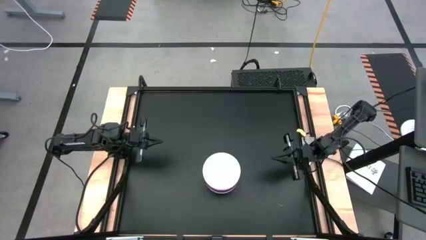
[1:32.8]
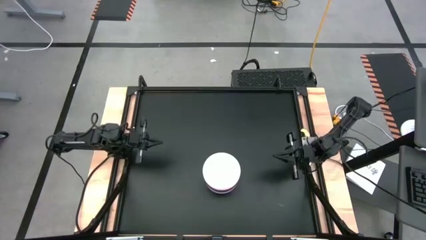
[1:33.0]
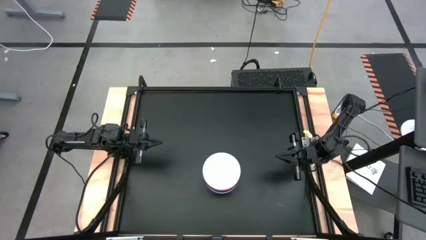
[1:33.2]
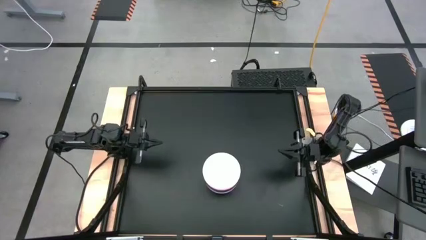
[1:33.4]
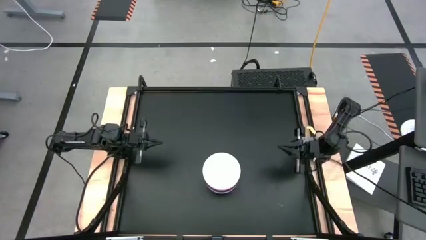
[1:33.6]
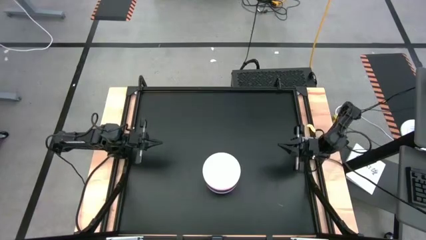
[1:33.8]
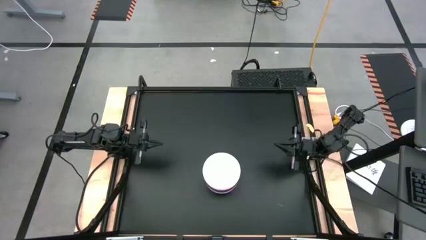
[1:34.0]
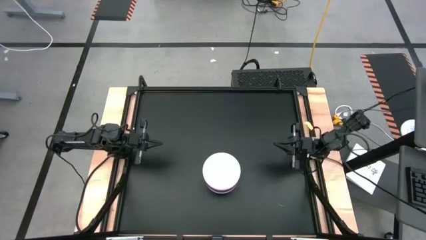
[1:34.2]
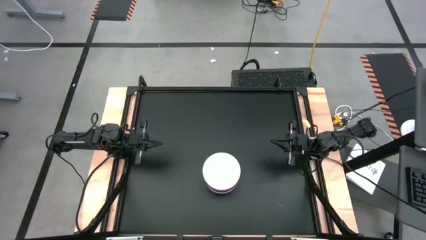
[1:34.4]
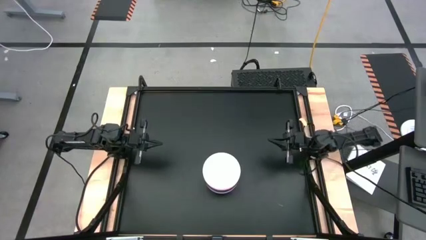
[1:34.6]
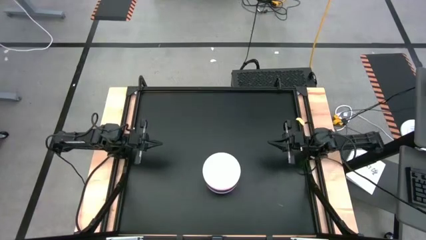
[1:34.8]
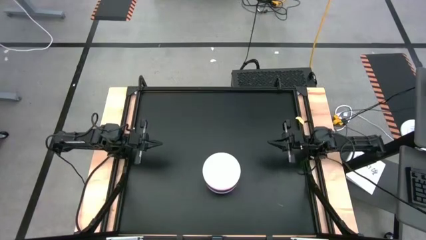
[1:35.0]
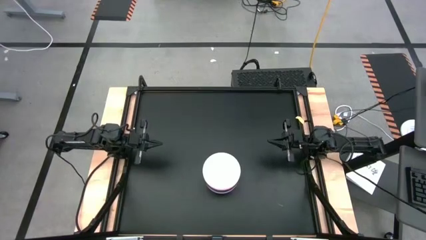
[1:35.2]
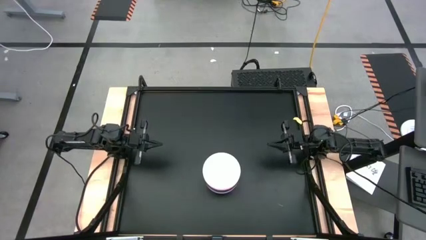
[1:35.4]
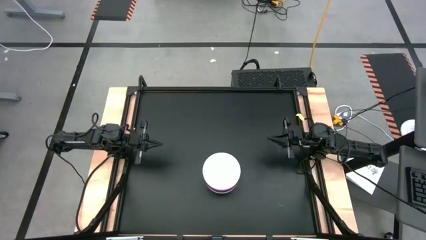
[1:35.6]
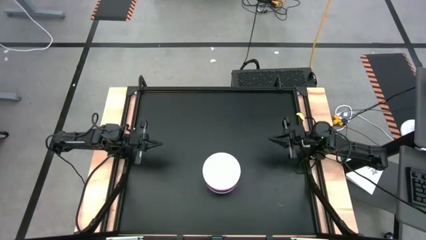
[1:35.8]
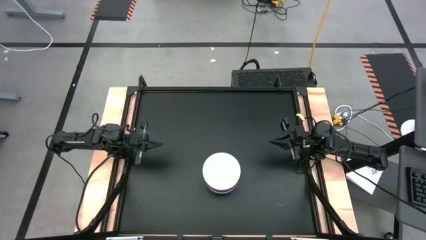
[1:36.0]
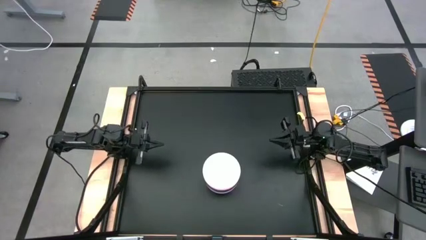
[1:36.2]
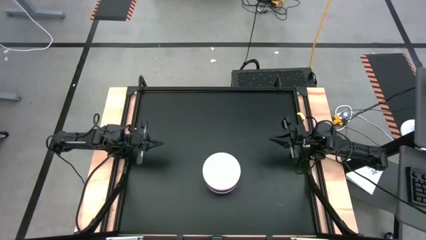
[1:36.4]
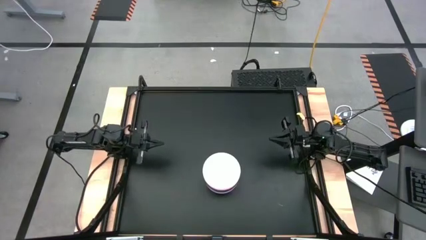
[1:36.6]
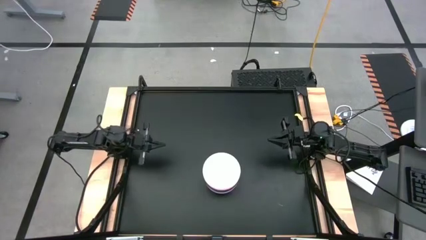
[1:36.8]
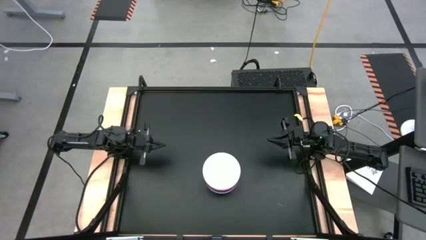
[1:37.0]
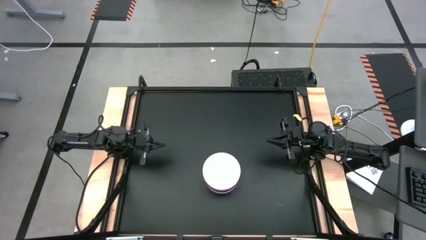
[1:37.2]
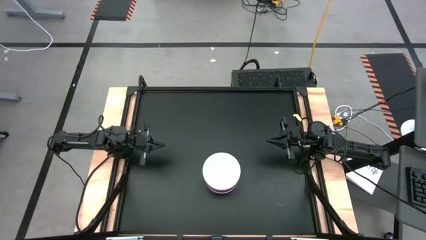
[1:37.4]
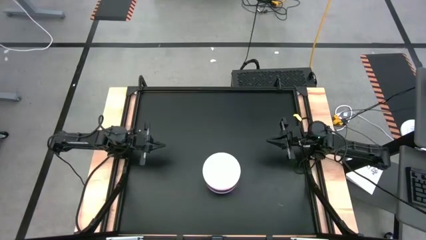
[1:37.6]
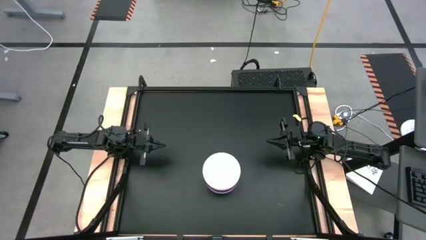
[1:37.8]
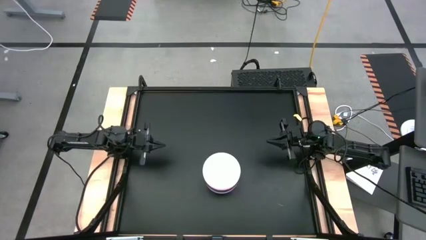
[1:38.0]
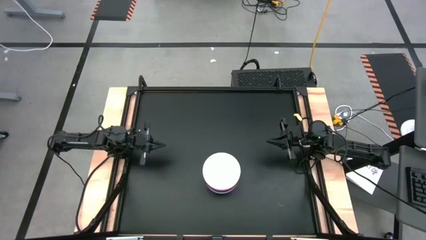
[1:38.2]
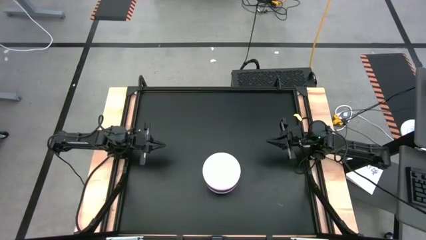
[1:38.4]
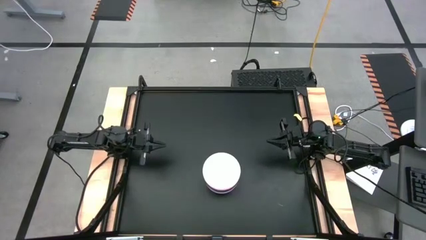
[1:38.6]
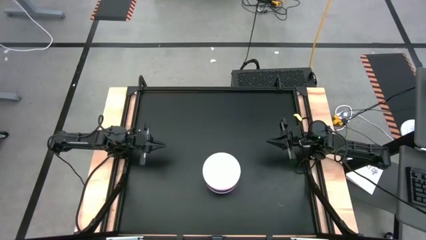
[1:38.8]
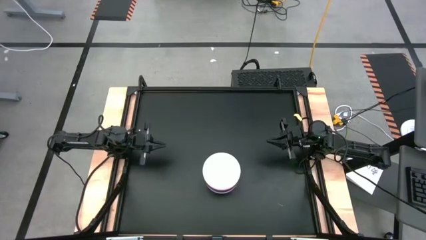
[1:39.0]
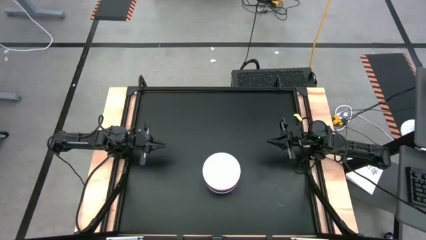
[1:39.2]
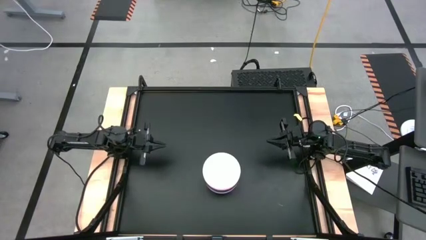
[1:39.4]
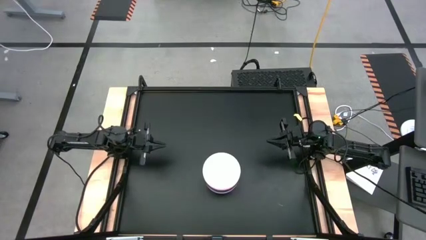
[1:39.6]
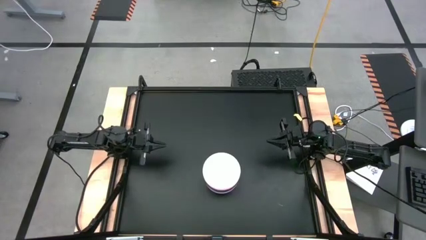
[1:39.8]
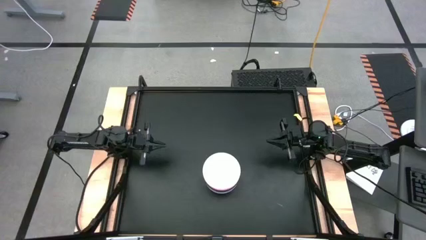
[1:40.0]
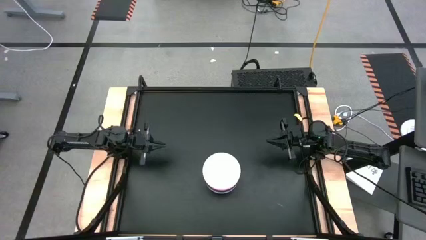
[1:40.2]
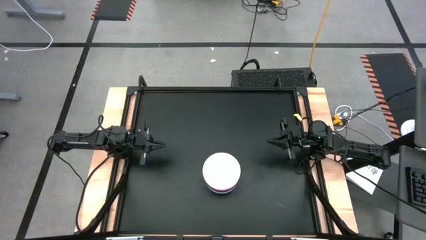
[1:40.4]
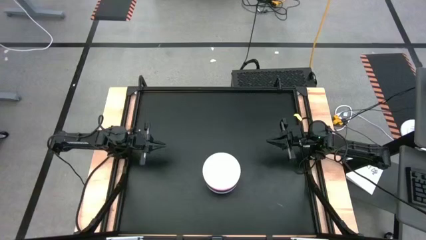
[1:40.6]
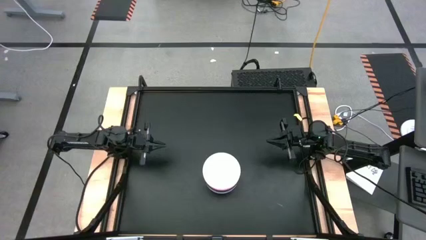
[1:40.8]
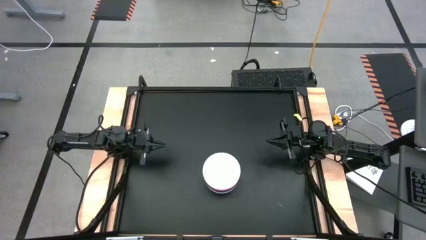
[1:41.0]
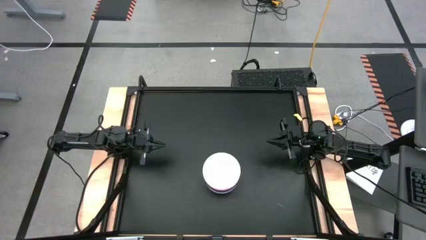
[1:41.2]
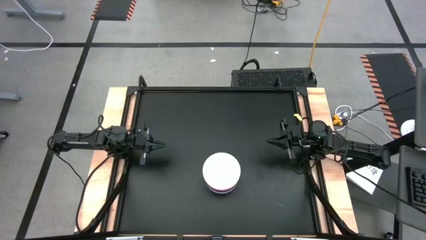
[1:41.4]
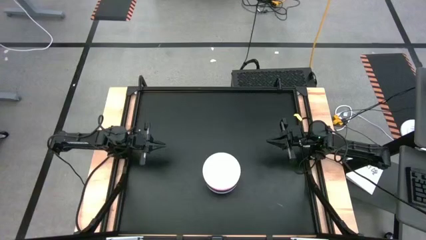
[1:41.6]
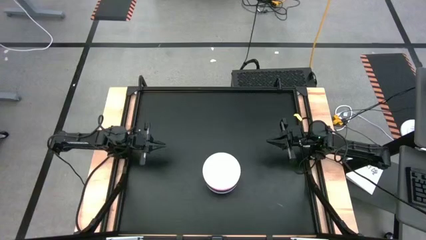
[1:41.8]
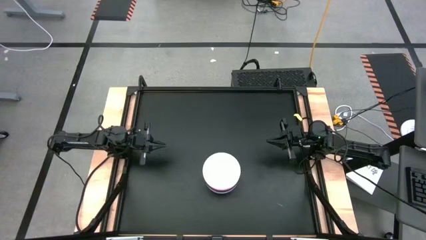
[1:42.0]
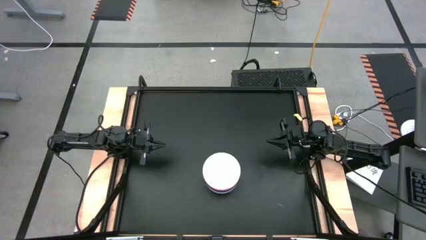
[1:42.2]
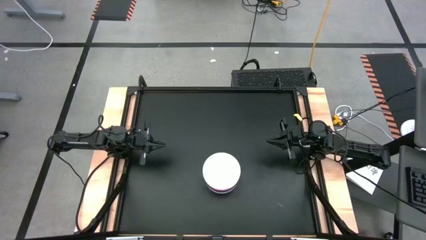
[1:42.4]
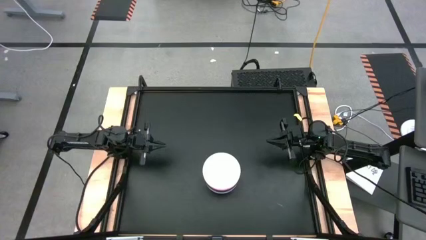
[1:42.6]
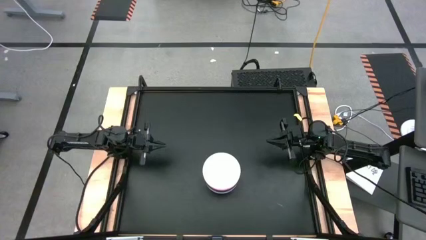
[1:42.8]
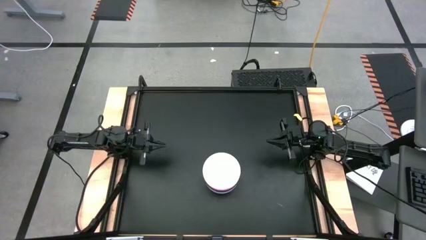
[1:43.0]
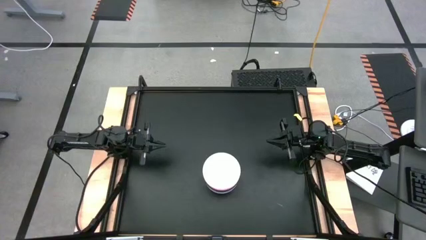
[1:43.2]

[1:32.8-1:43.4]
Task: Nest bowls inside each other
Return to Home Position

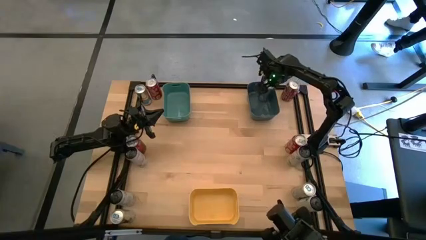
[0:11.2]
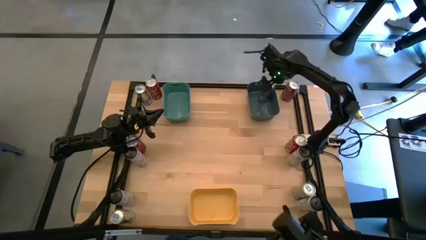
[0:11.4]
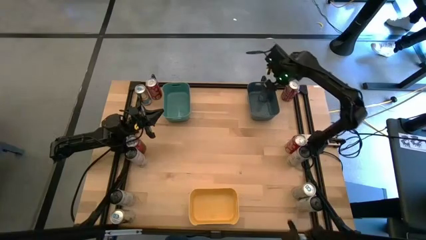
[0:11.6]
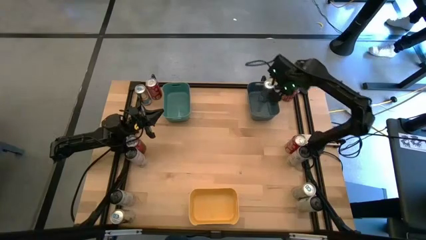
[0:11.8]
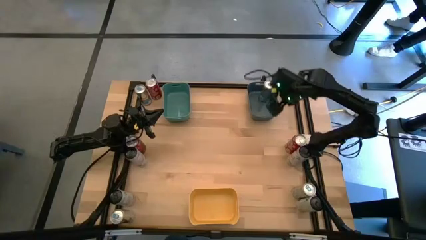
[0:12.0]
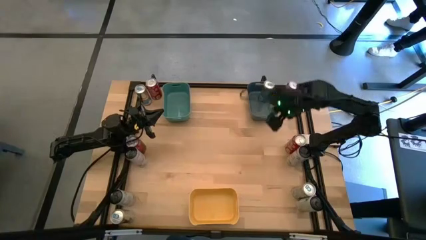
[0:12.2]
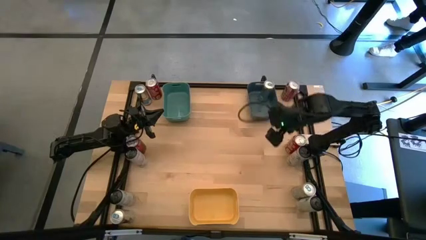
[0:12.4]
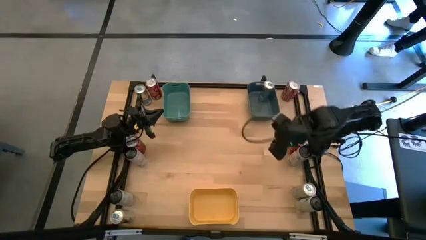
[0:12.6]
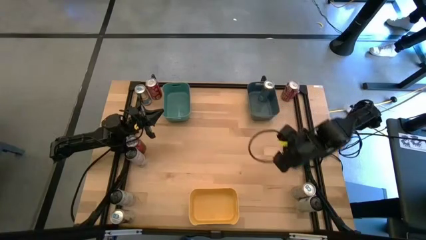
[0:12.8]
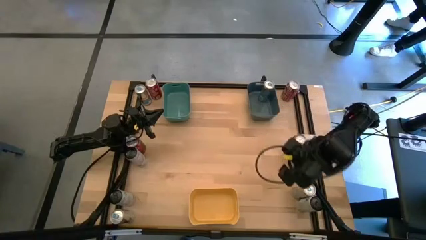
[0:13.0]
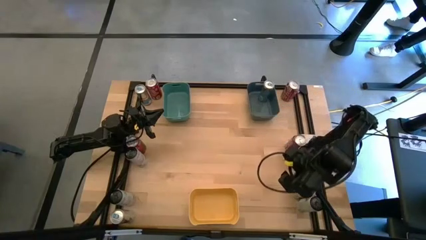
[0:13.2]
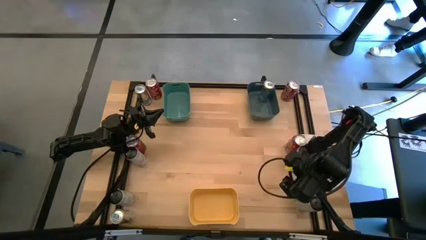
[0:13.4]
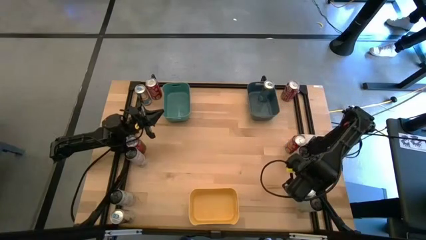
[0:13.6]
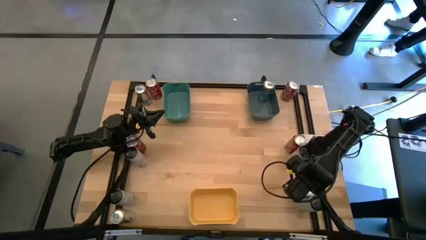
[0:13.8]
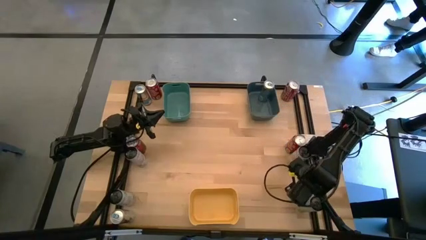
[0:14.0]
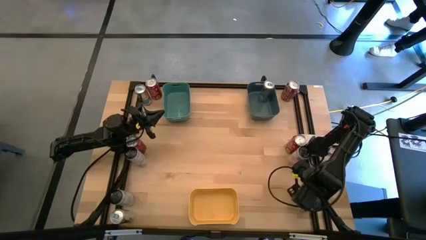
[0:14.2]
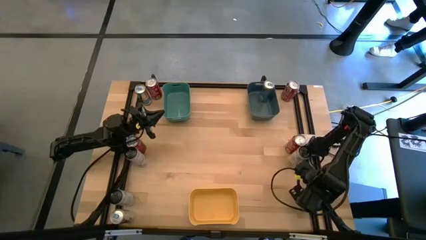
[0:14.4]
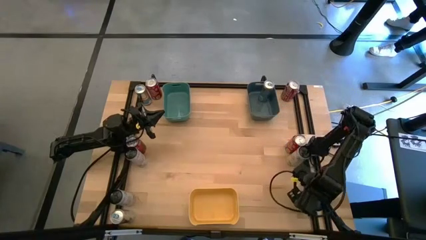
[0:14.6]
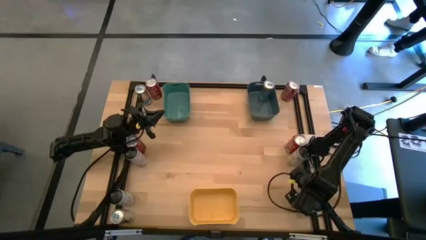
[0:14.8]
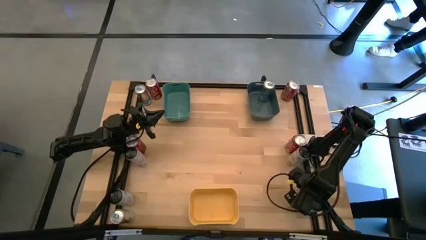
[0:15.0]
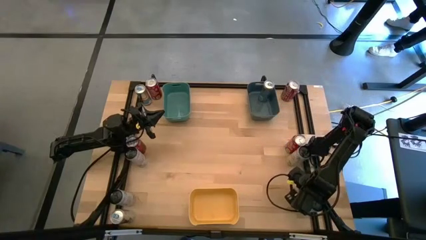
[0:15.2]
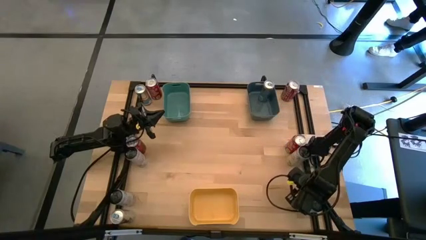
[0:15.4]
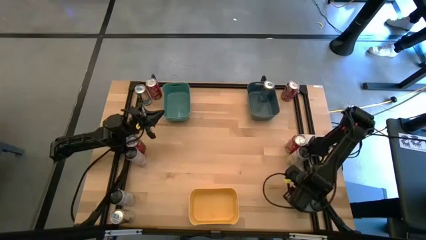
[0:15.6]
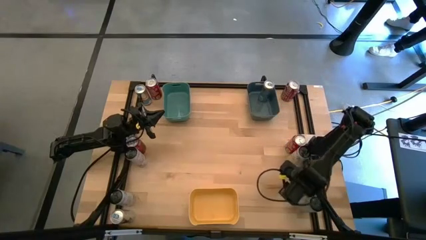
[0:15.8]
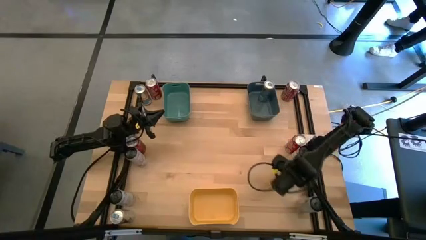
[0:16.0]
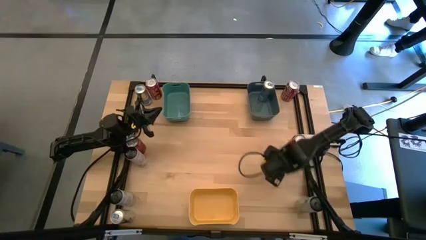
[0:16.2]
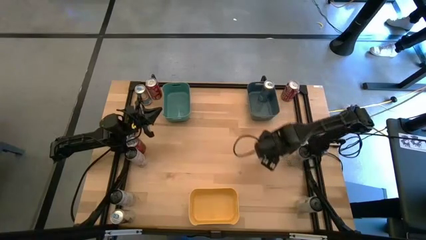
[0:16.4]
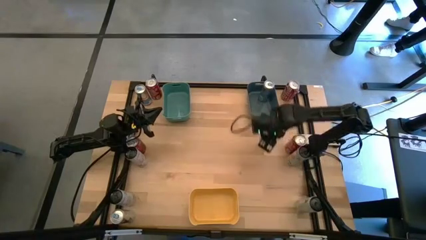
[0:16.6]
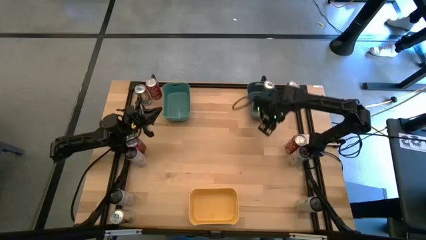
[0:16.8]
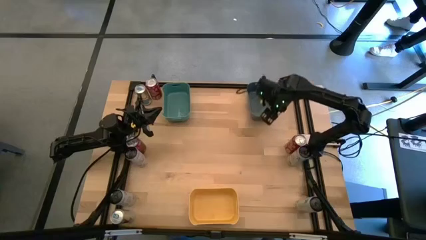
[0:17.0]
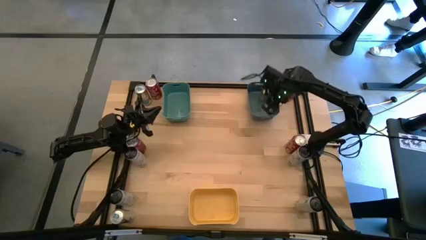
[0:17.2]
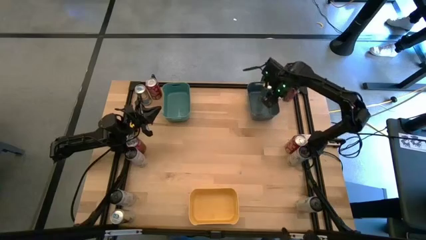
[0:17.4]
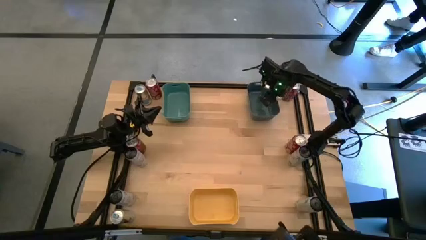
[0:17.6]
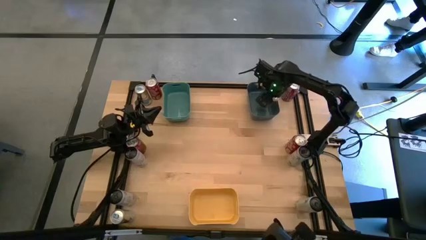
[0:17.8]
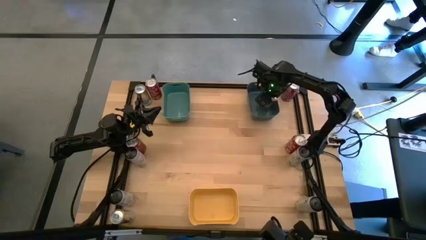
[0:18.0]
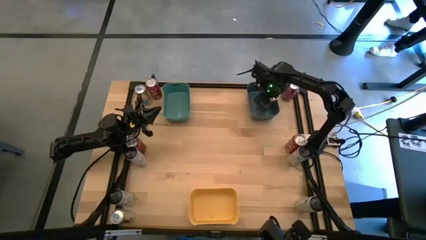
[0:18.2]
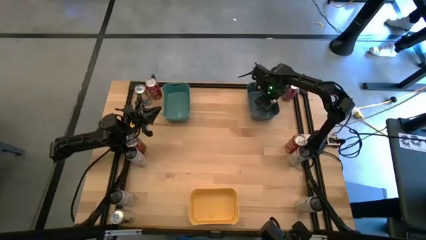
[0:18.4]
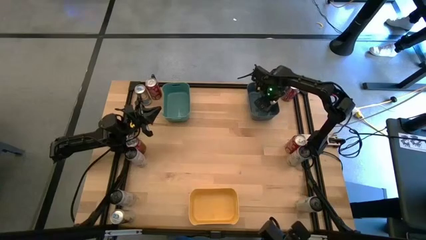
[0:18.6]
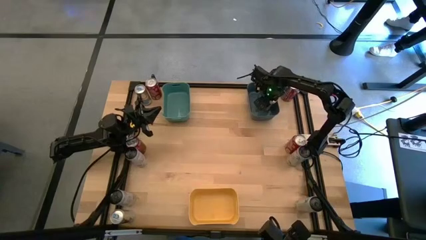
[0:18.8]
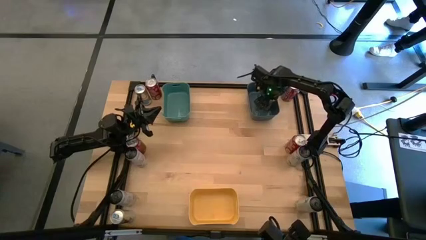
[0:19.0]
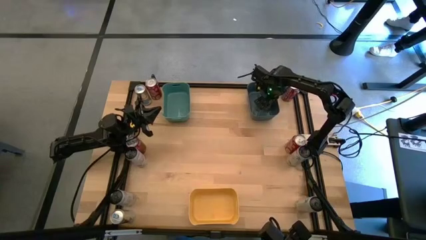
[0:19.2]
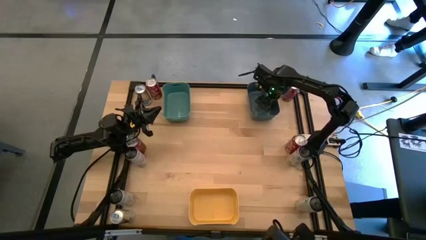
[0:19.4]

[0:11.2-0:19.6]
Task: Sort soda cans
Put the bottom right blue soda can into the blue bin
